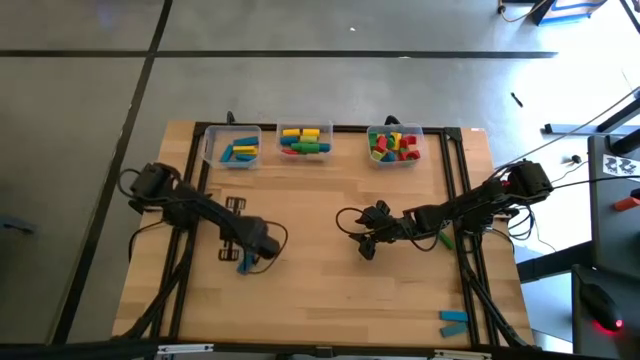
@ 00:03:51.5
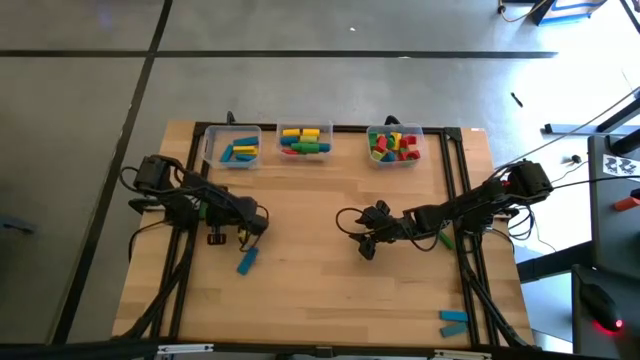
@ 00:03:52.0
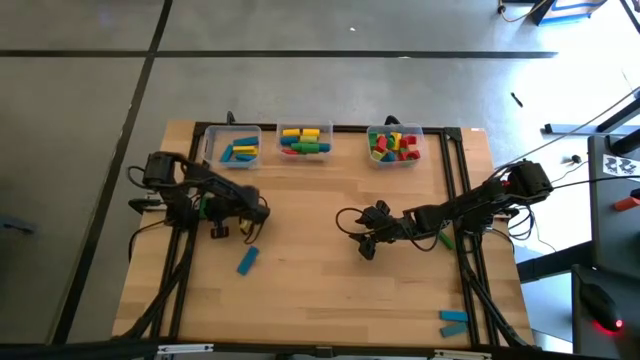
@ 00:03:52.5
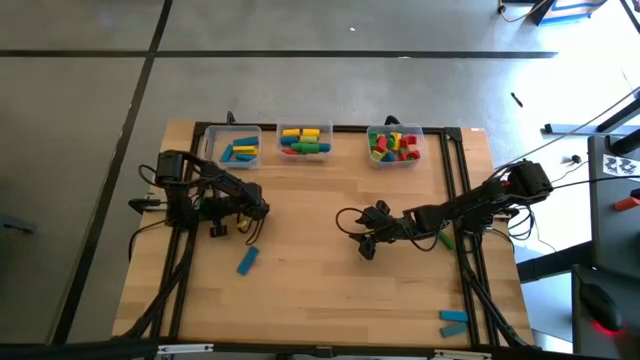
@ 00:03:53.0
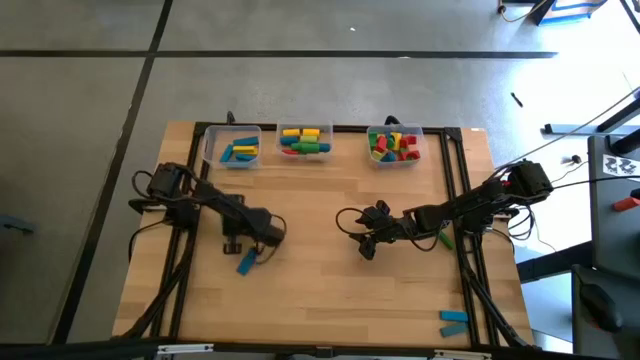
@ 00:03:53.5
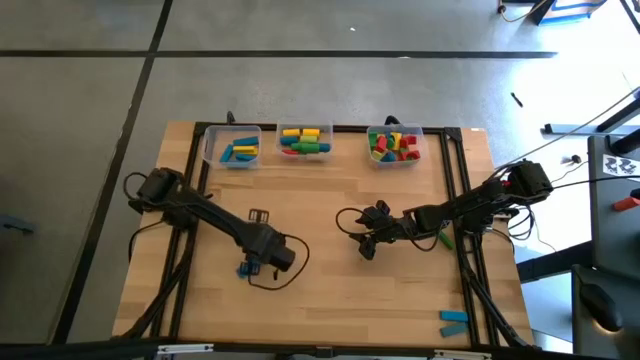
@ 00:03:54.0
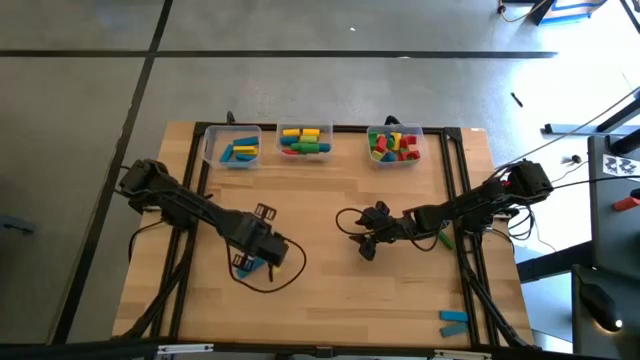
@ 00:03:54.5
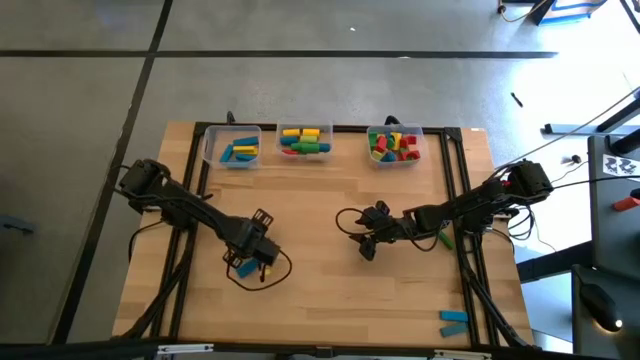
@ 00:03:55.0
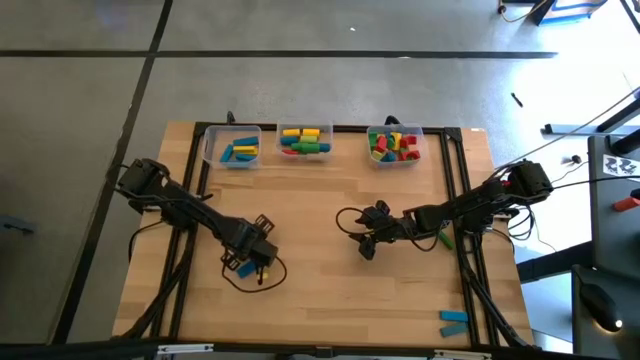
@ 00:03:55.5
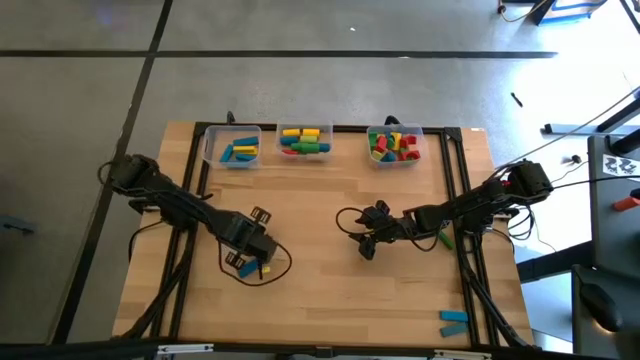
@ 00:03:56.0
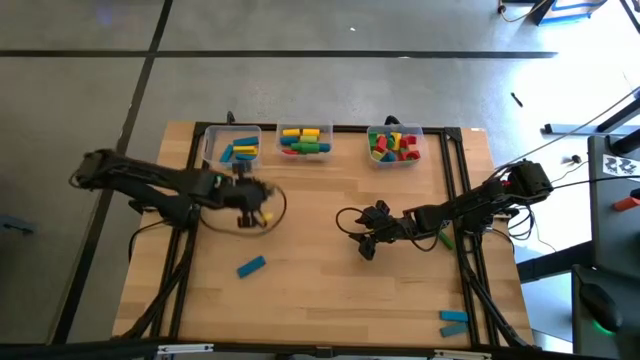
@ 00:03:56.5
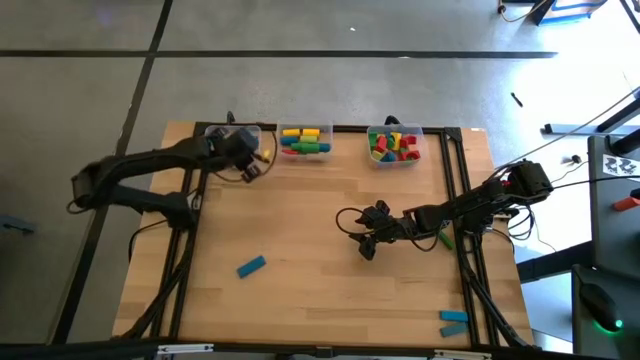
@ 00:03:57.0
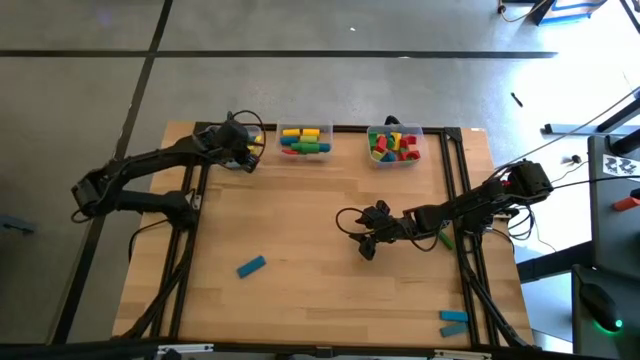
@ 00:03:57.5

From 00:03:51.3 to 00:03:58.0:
Task: Sort blocks by size
Put the green rectangular block into the left transparent bin

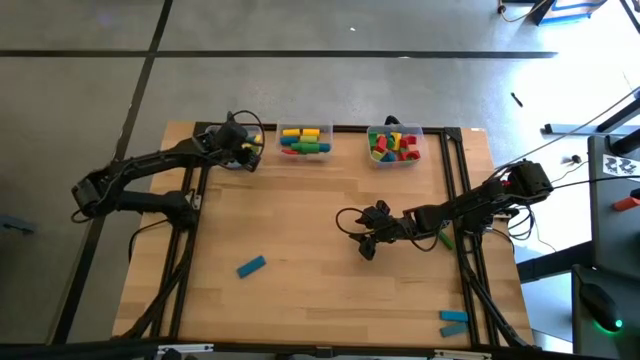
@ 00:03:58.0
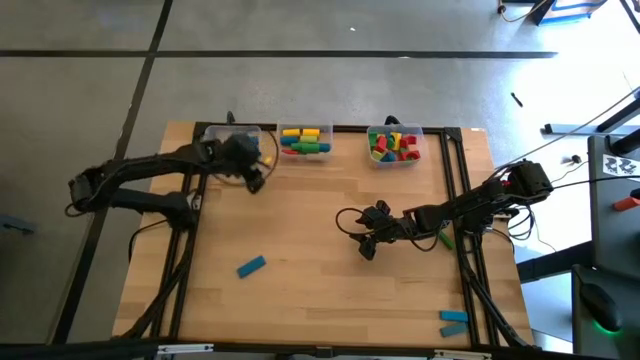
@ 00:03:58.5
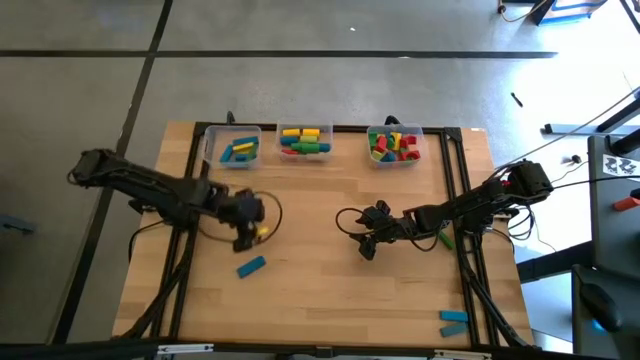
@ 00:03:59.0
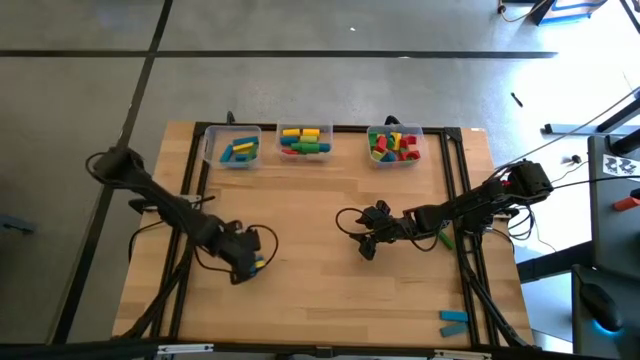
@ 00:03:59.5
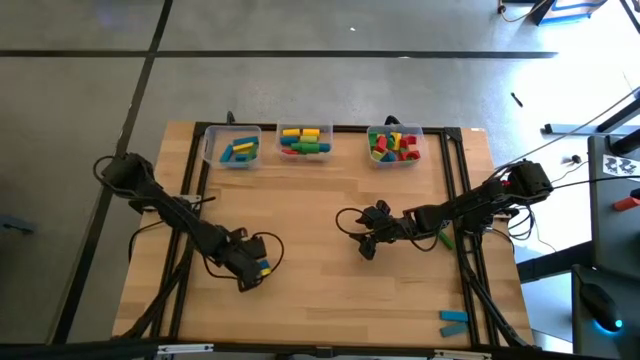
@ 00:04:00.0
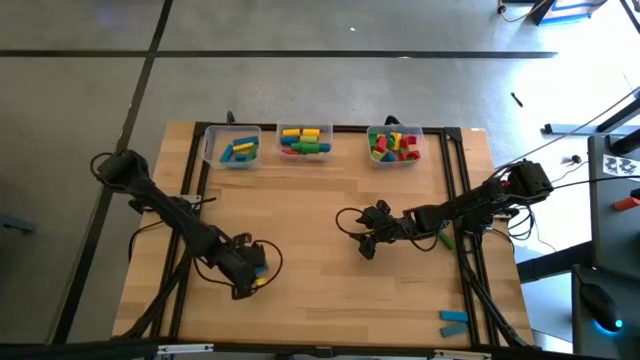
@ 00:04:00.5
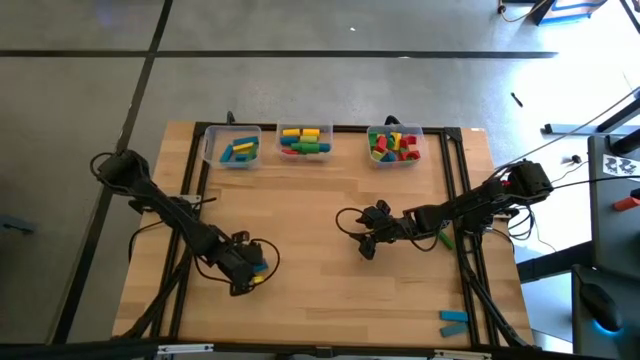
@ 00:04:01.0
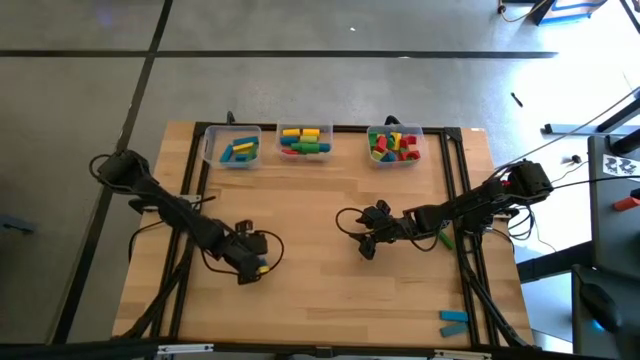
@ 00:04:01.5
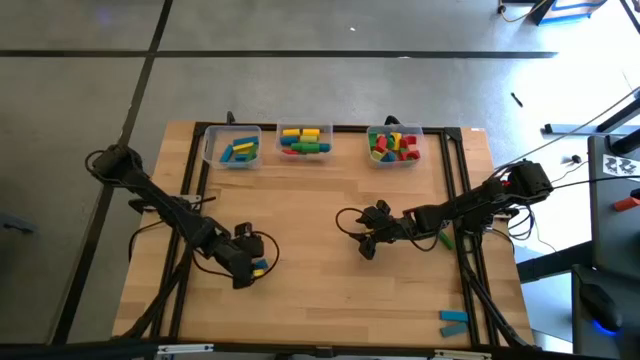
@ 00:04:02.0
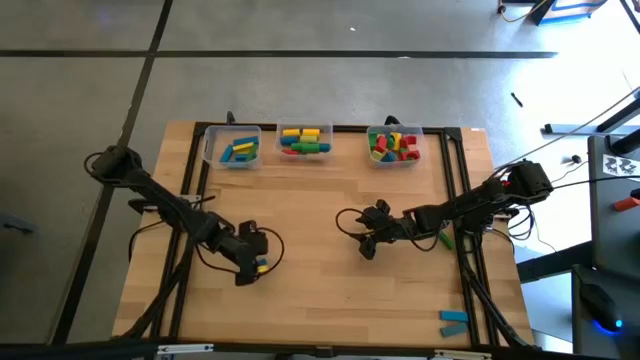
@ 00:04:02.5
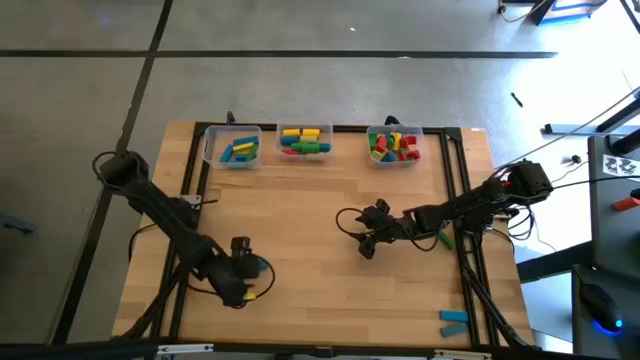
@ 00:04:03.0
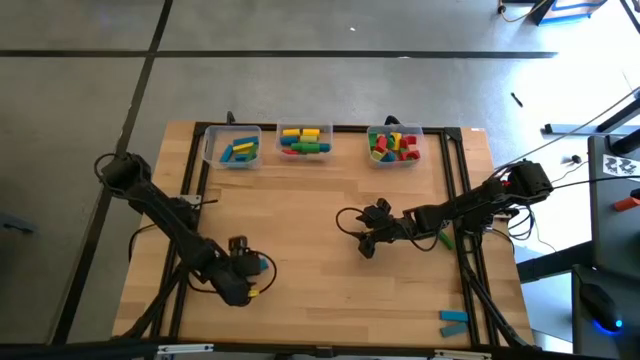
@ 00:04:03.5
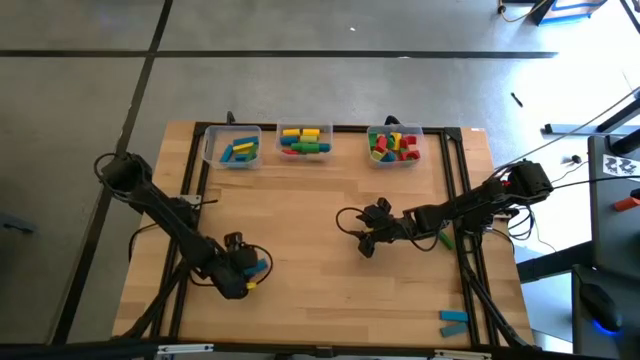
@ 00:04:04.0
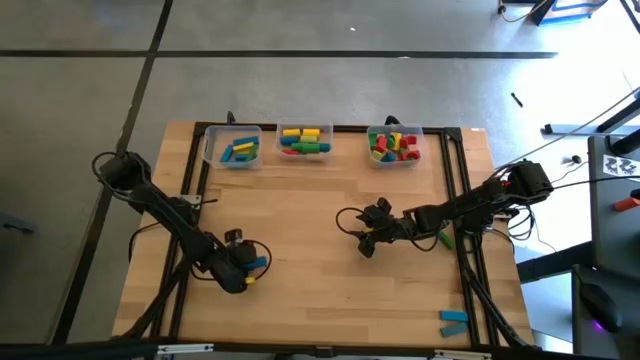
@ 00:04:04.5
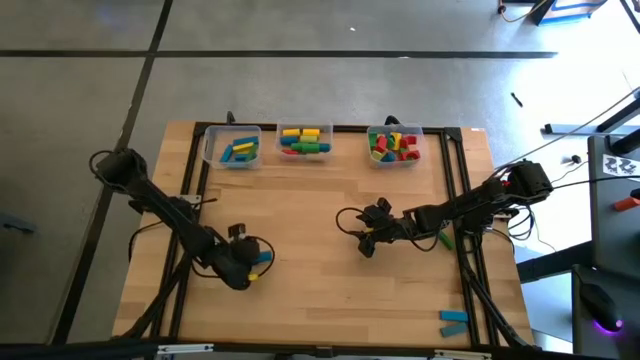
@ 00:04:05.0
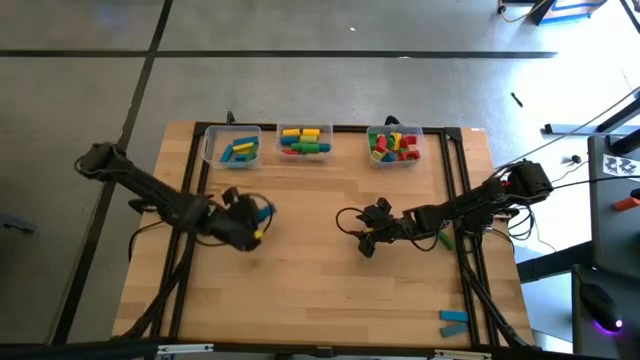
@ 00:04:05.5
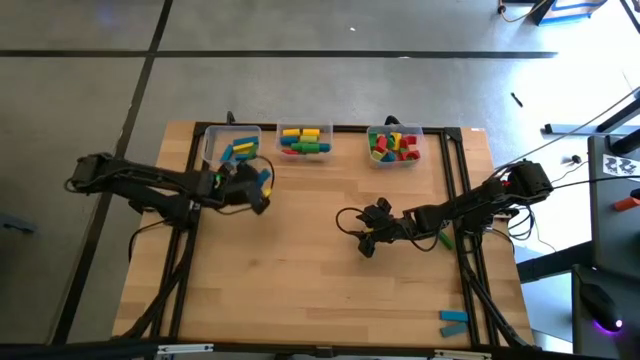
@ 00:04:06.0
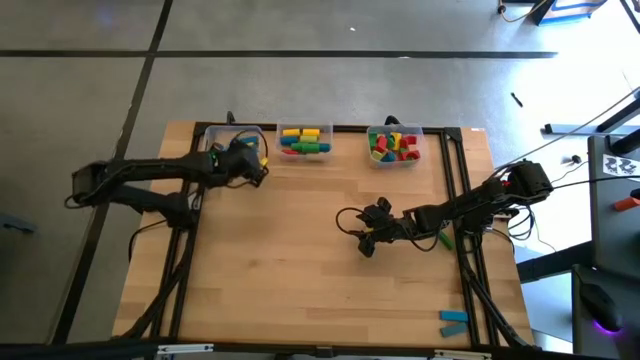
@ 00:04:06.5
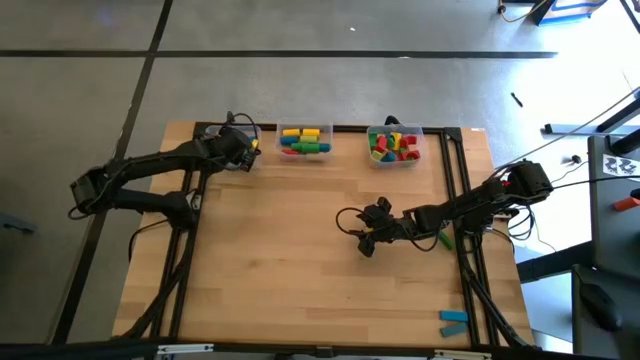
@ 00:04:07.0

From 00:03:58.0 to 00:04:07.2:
Put the blue rectangular block into the left transparent bin

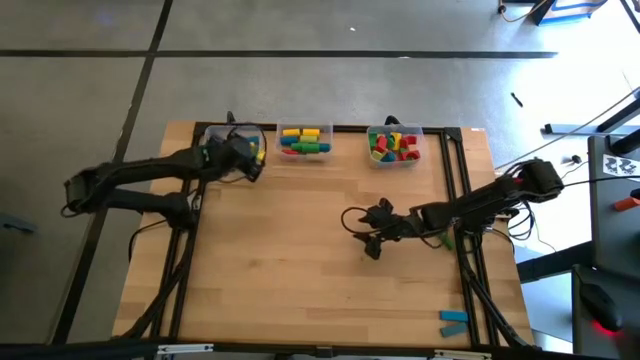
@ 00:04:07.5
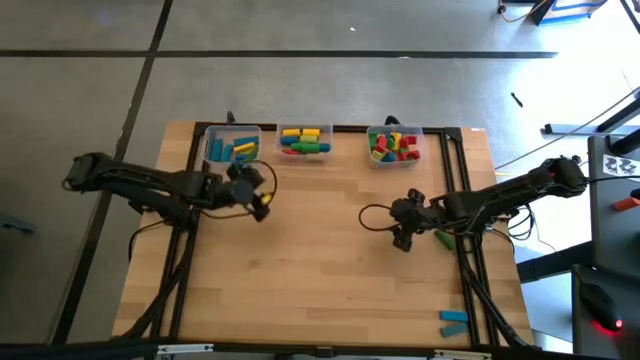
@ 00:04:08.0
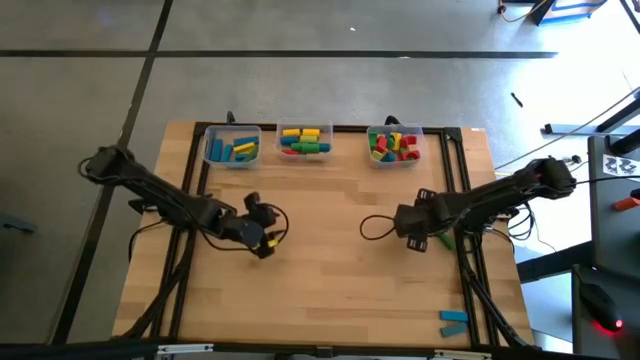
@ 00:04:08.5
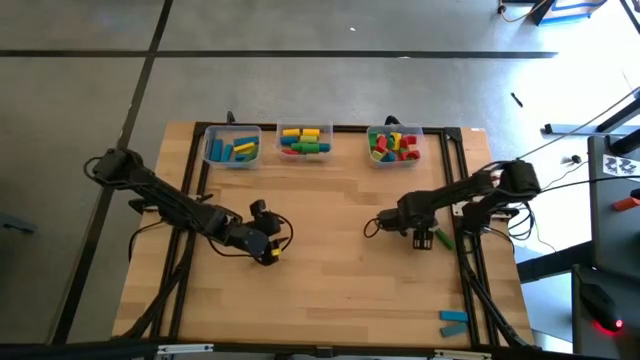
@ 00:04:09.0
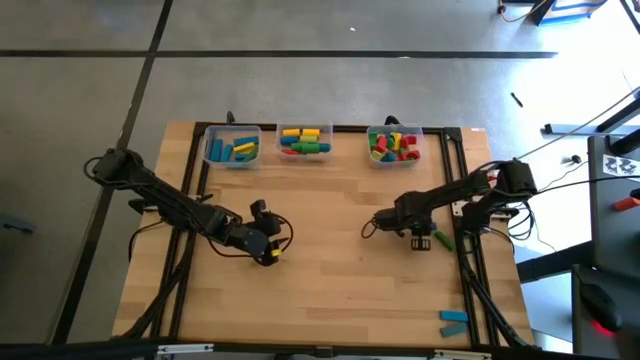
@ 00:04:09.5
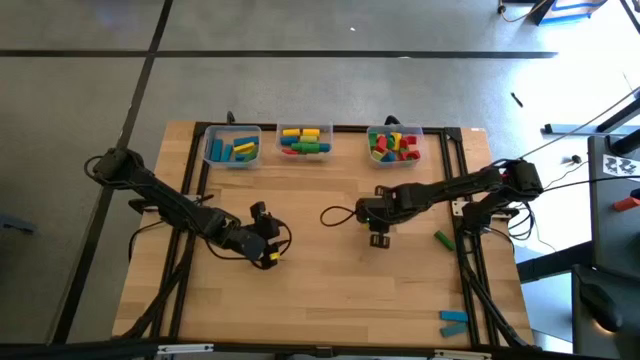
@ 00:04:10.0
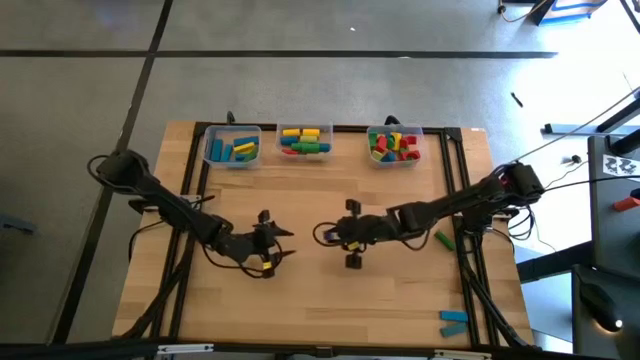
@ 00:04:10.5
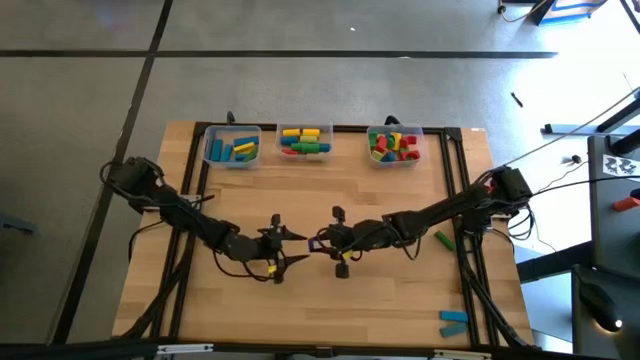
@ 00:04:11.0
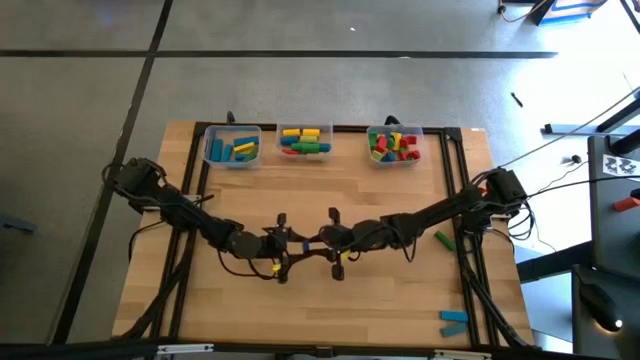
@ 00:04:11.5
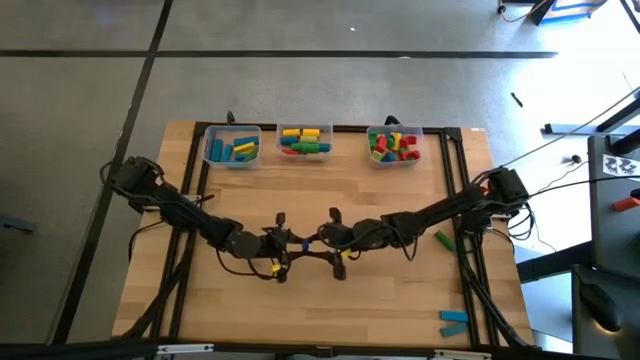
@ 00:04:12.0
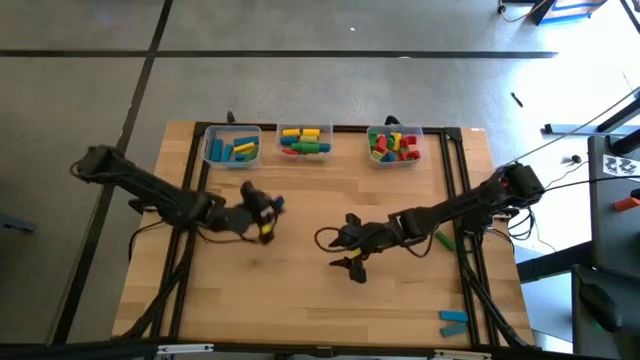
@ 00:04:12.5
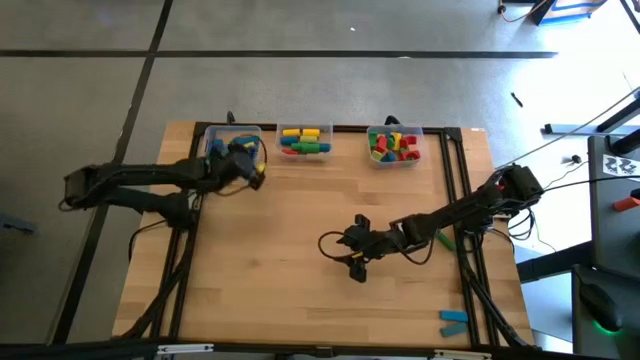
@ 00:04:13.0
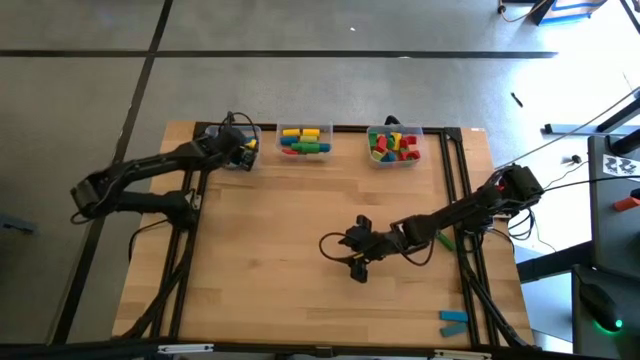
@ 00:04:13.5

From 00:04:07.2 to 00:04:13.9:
Put the dark blue rectangular block into the left transparent bin
